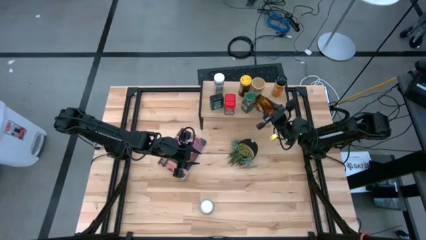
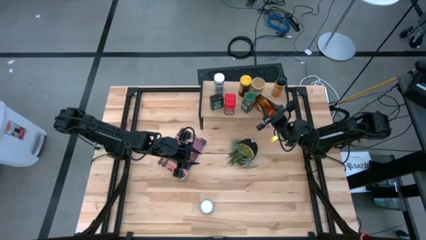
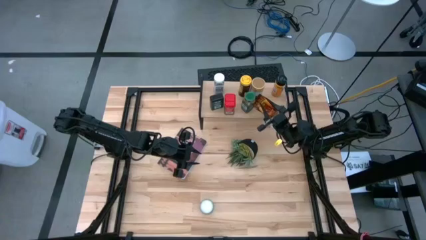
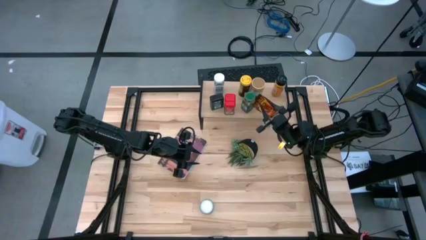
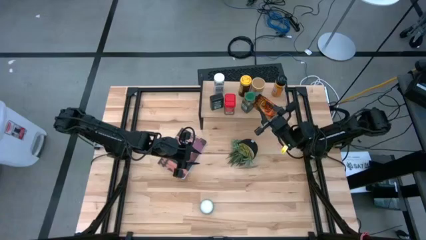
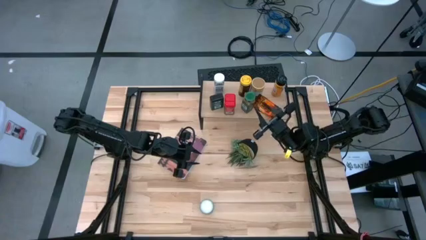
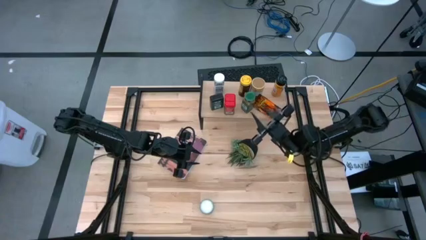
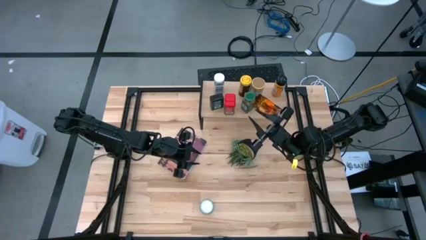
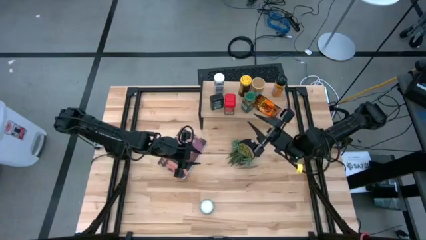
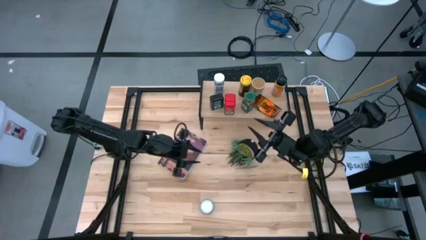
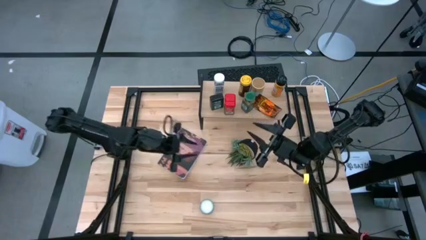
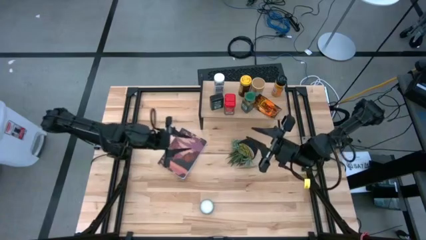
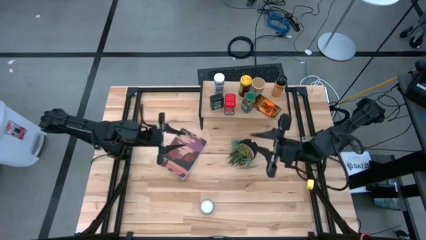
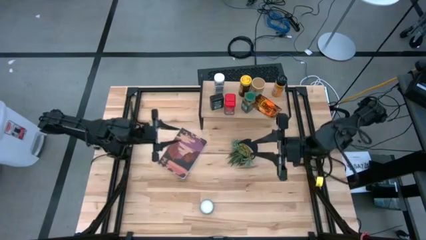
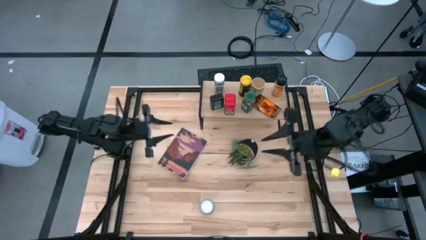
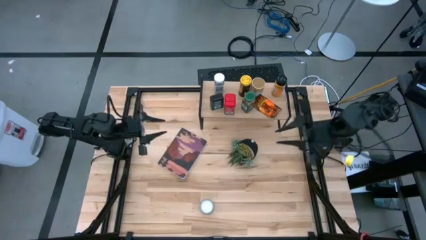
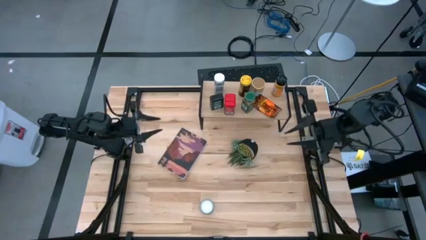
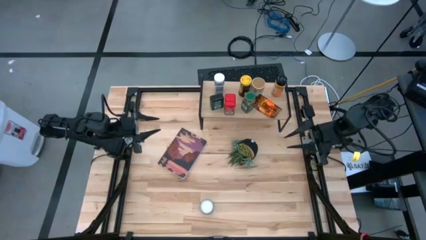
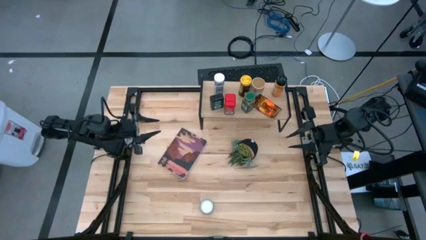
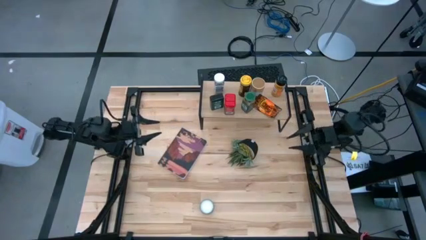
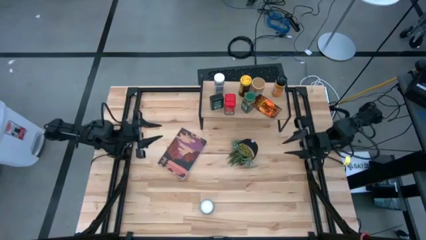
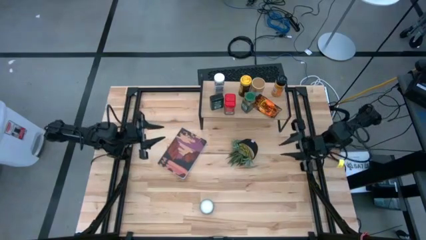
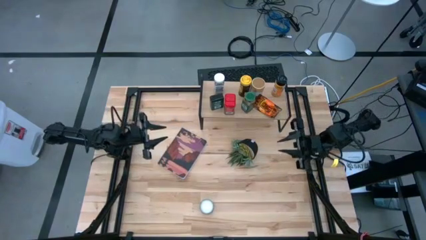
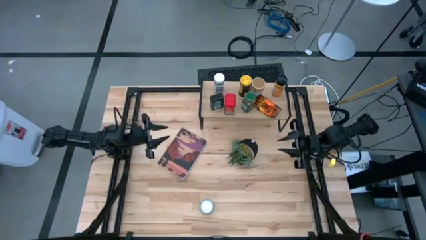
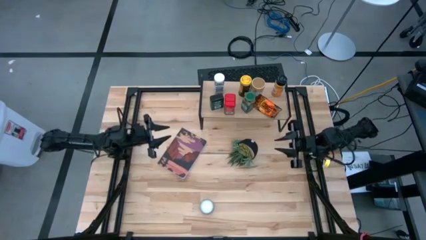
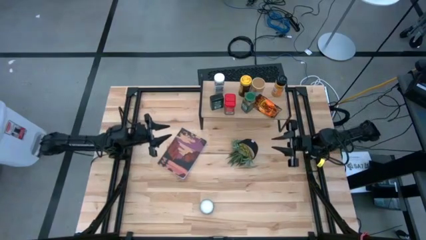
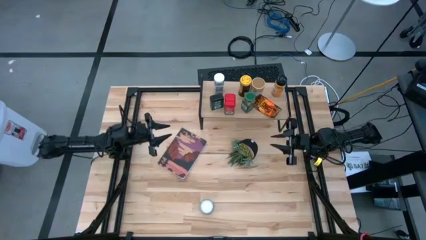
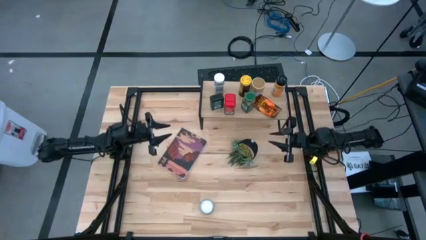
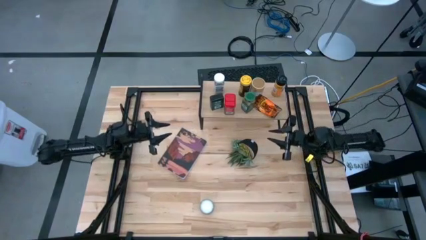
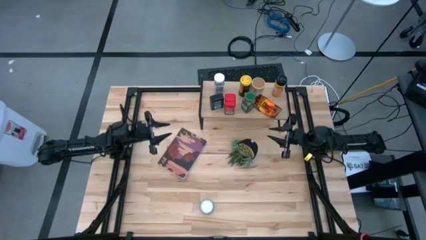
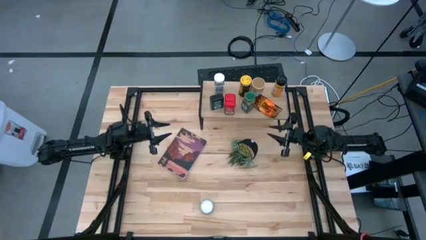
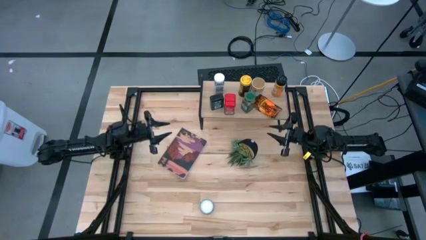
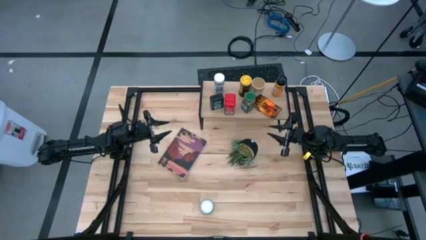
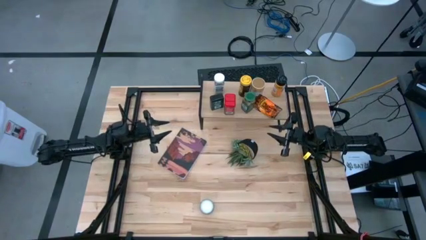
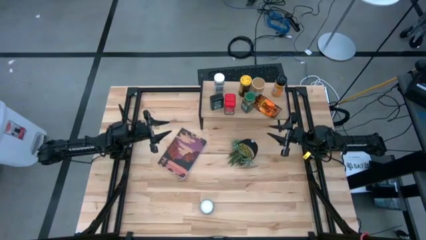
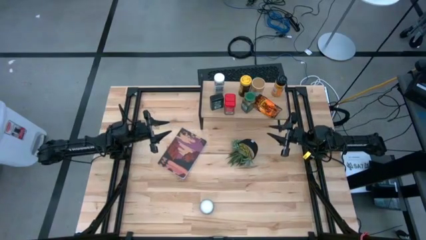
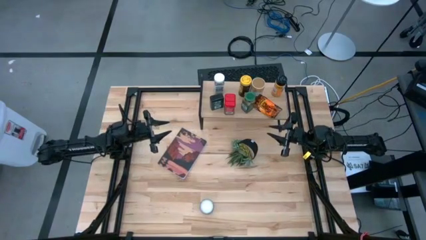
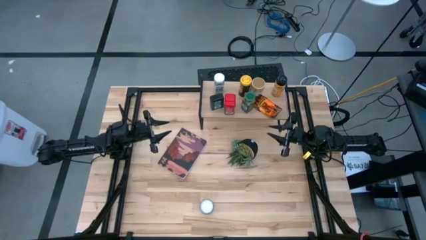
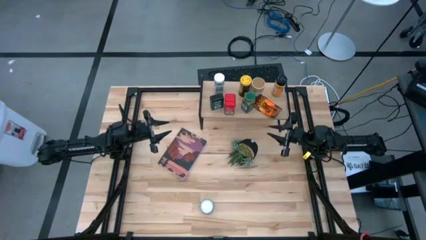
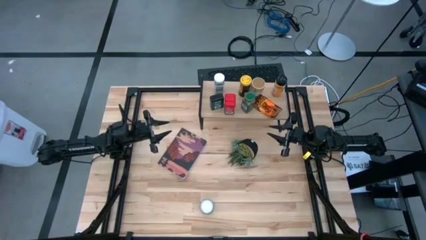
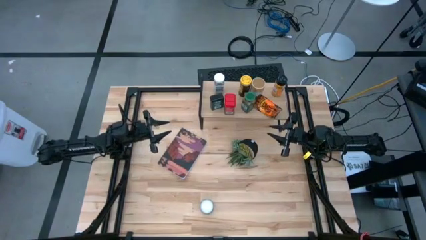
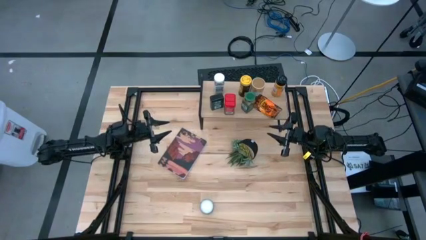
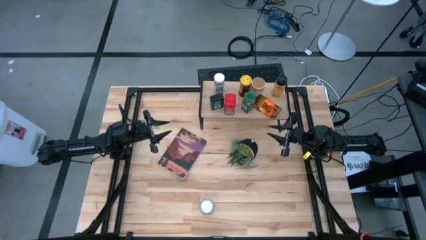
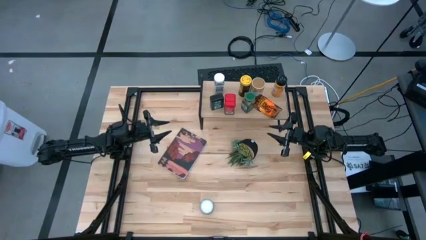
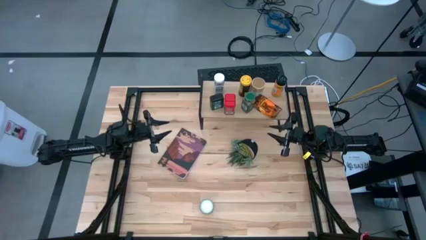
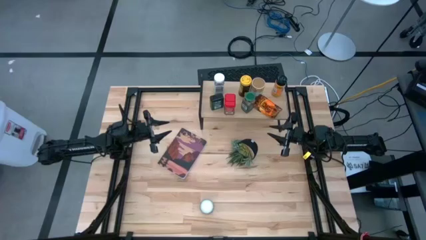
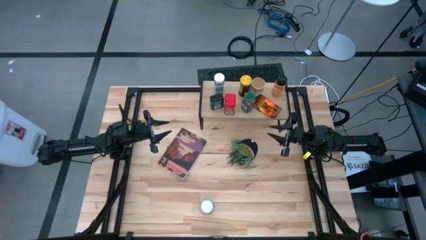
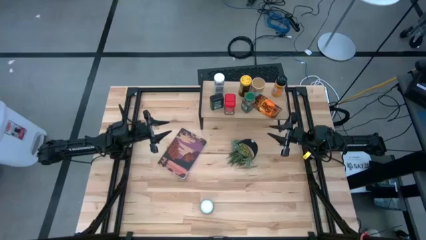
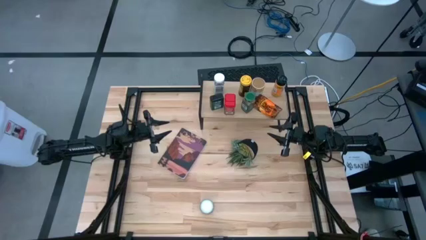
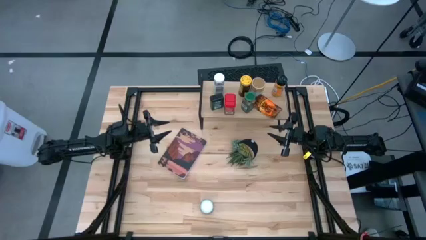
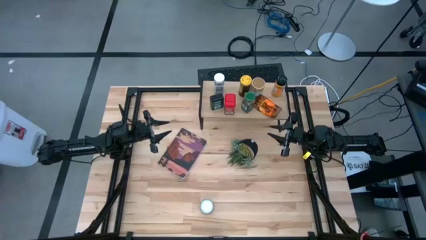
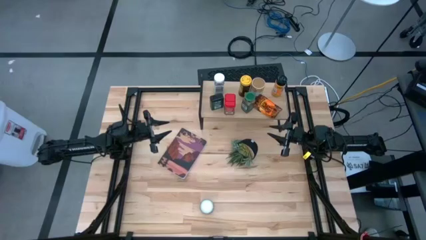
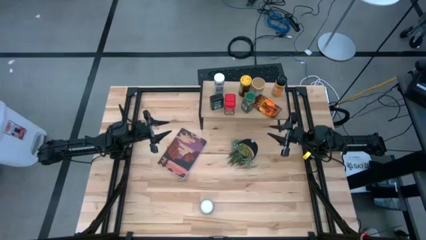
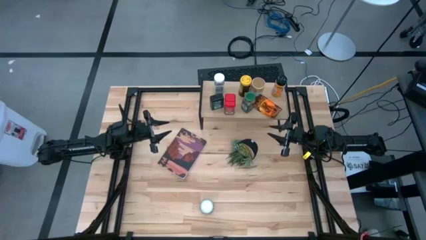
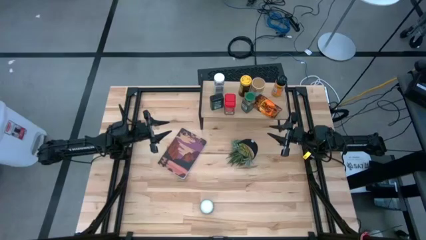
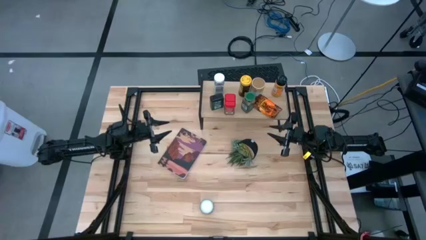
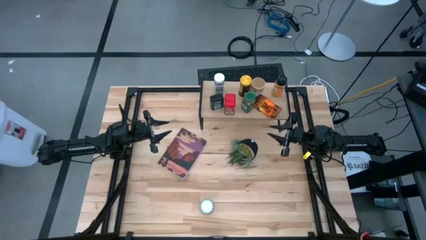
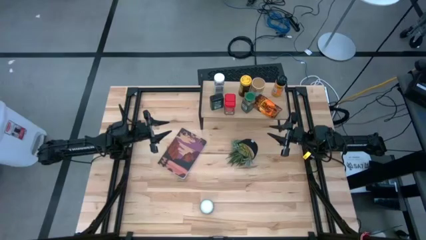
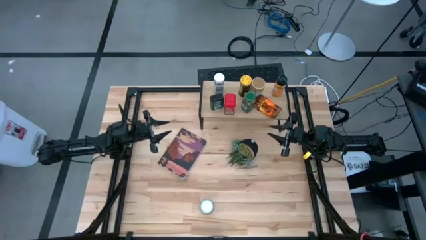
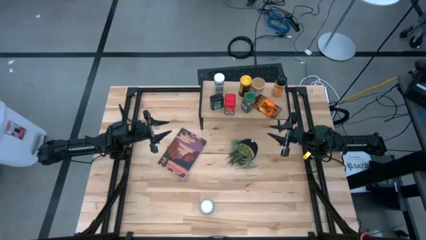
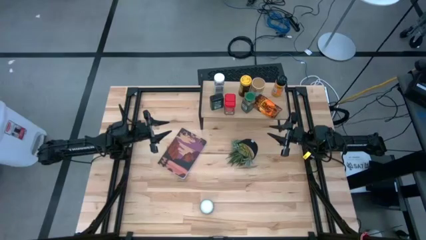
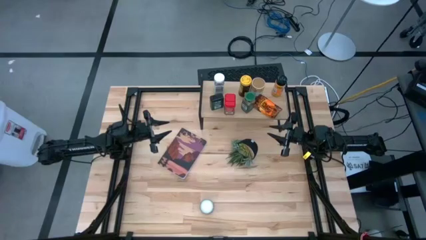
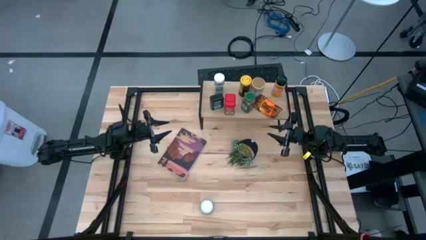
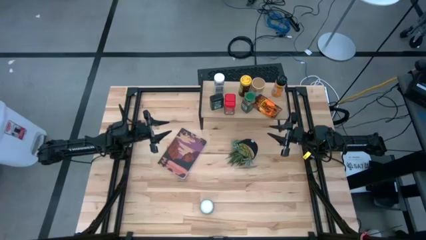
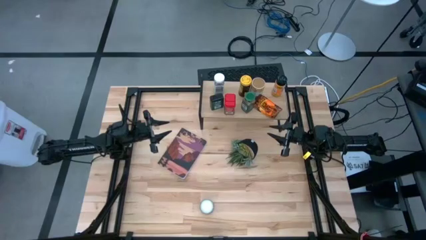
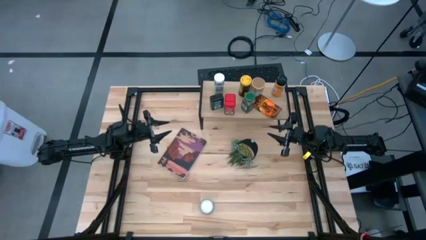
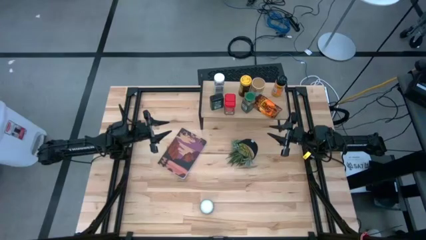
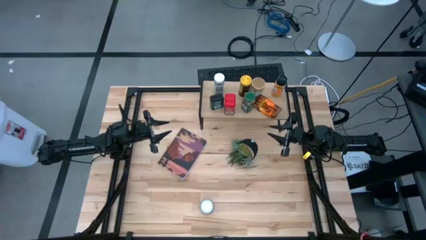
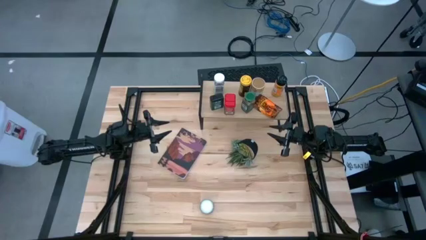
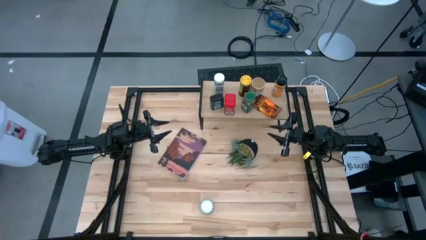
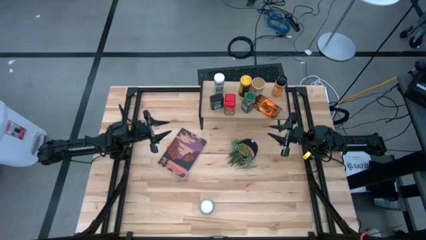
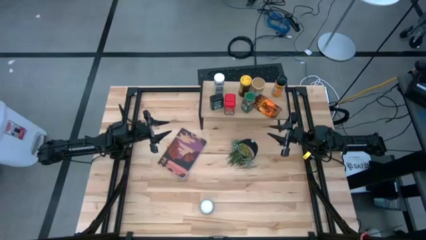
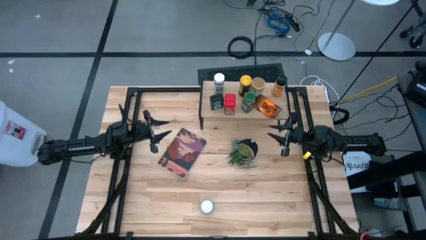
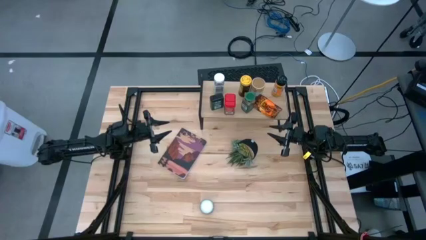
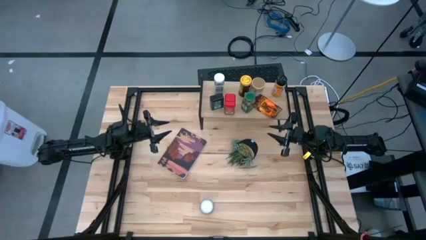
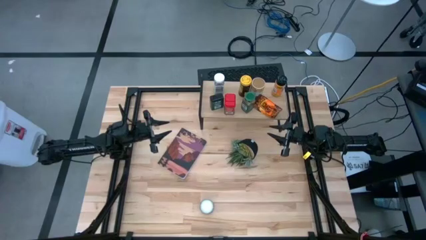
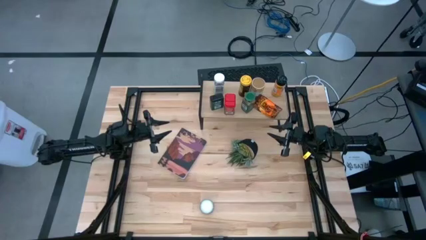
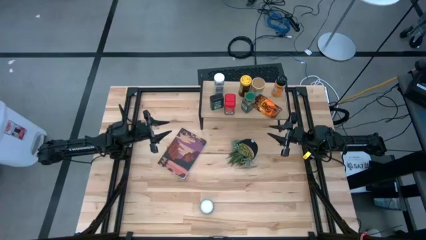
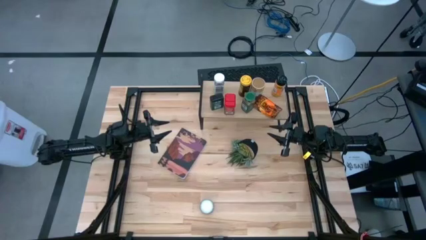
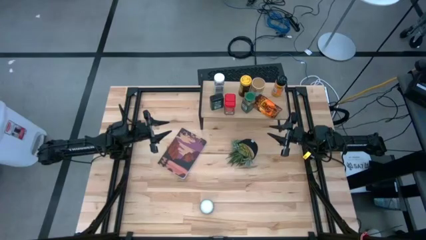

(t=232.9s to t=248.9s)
Task: Shelf spices
Return to Home Position

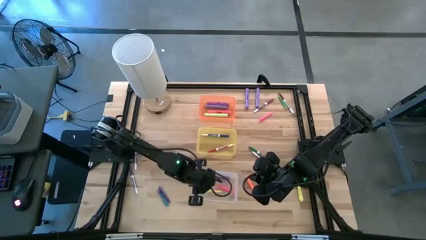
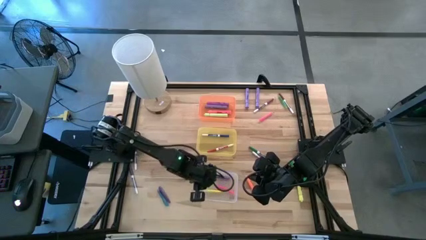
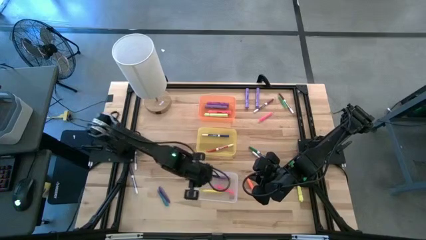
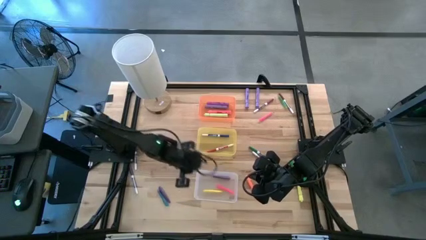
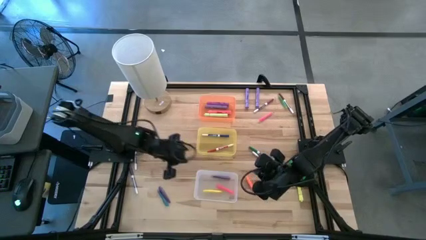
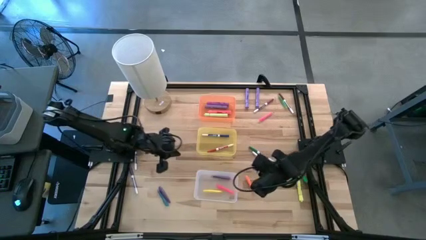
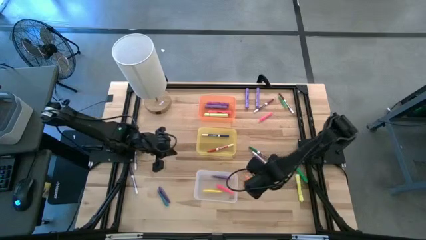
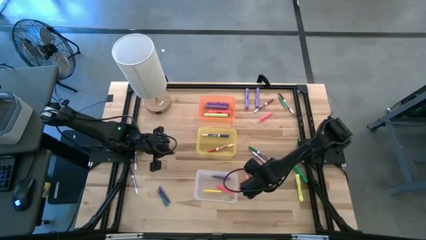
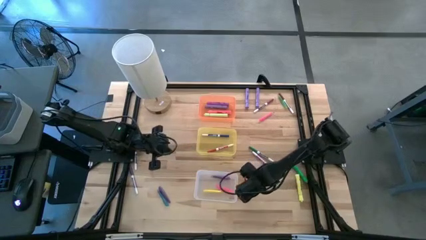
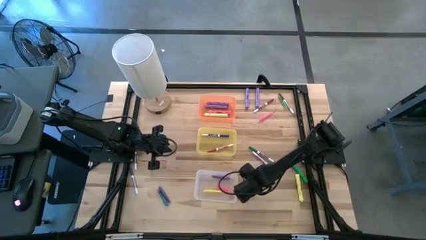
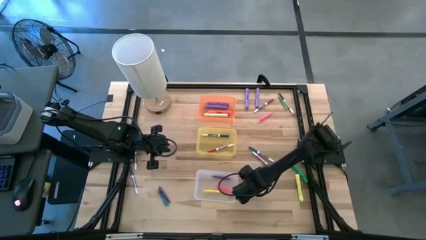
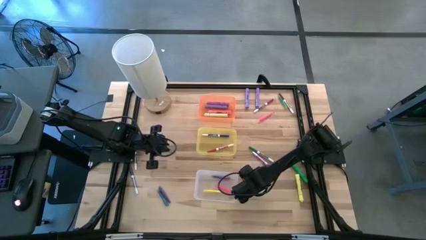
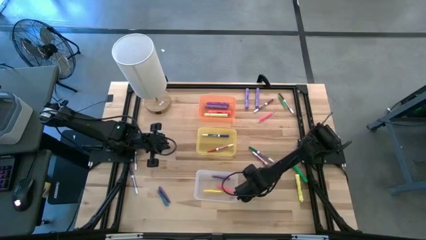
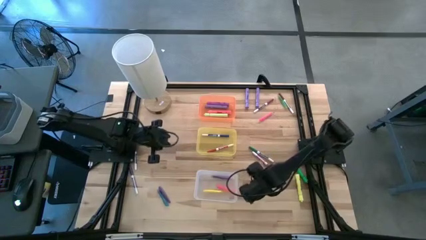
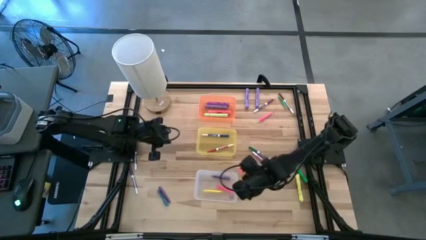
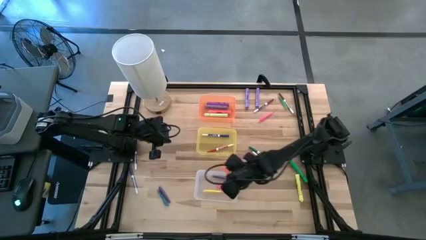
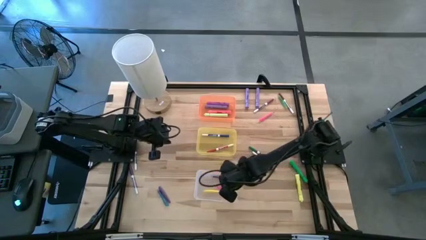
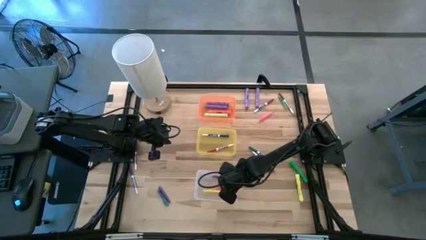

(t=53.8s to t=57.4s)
Task: Pick & Place Markers
Put the orange pen into the white bin
